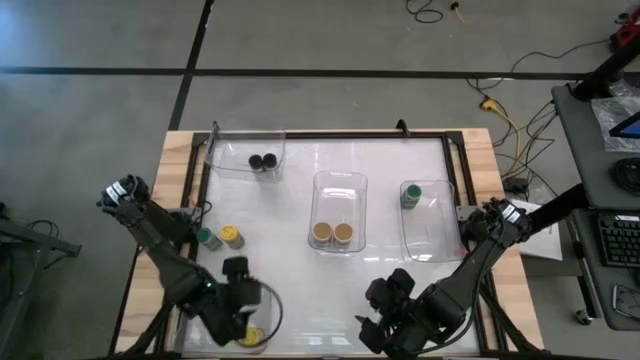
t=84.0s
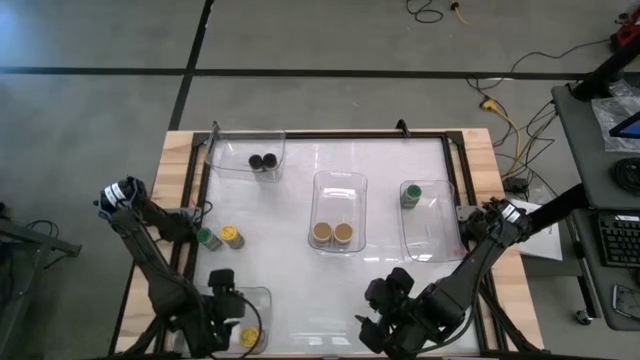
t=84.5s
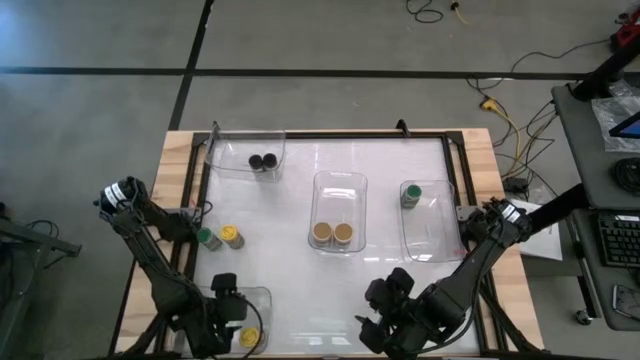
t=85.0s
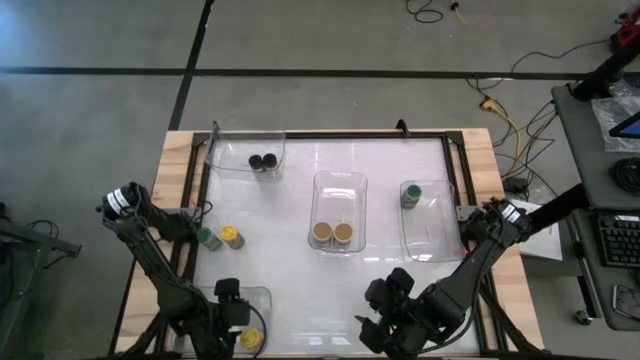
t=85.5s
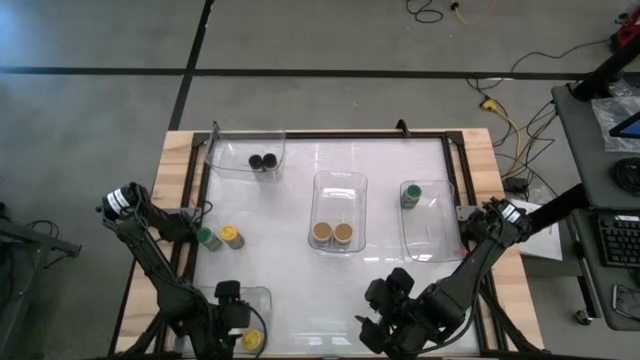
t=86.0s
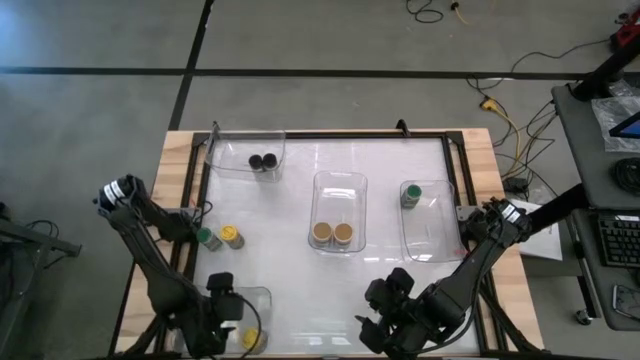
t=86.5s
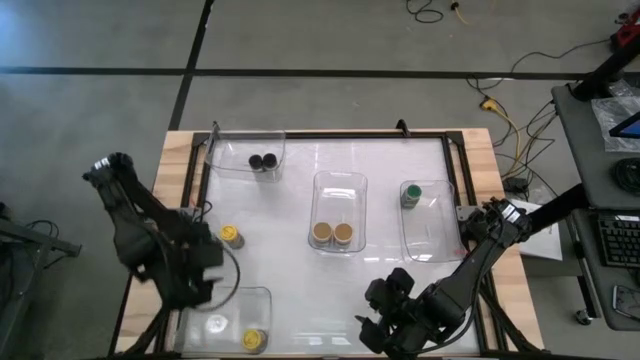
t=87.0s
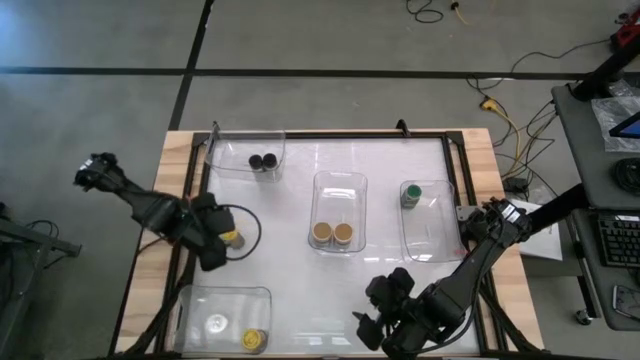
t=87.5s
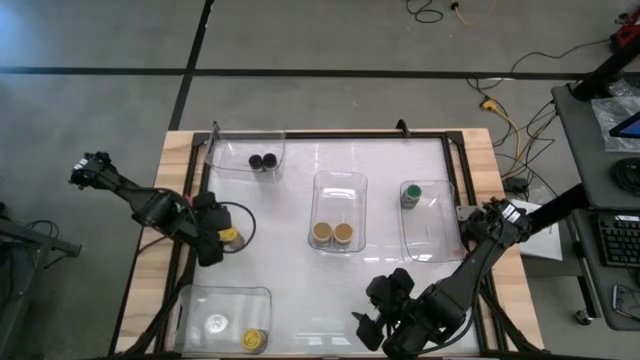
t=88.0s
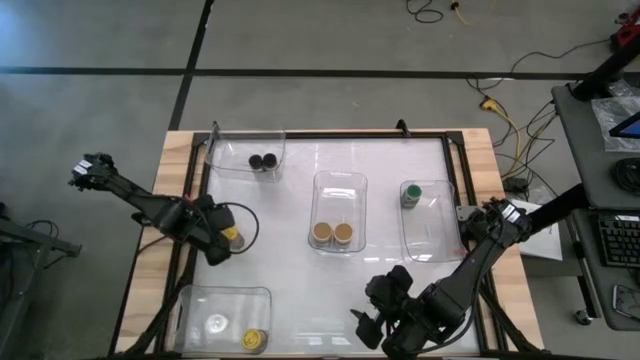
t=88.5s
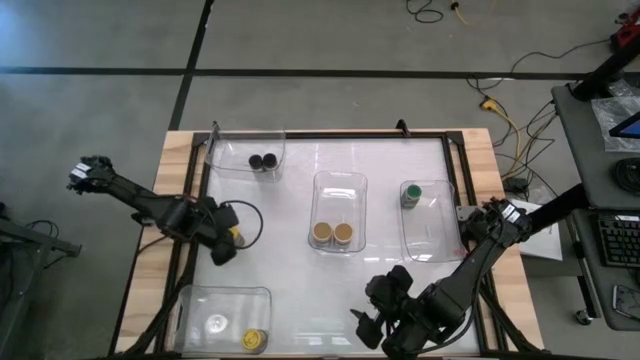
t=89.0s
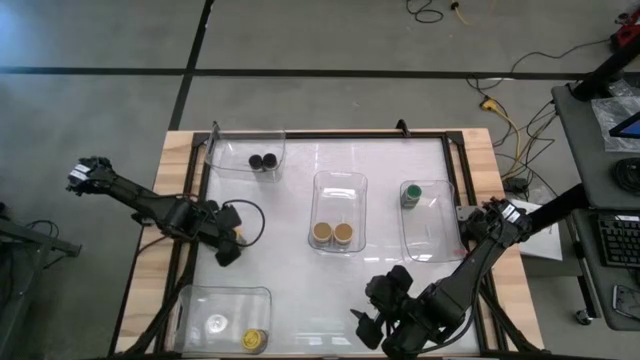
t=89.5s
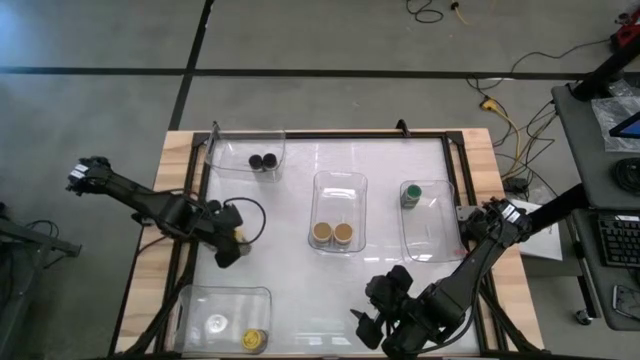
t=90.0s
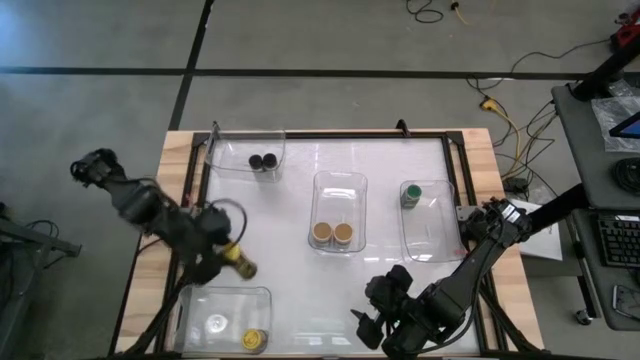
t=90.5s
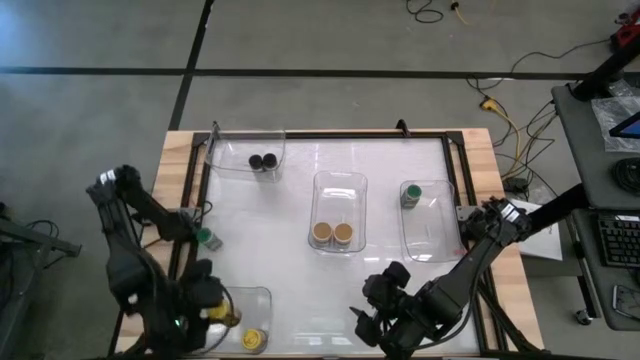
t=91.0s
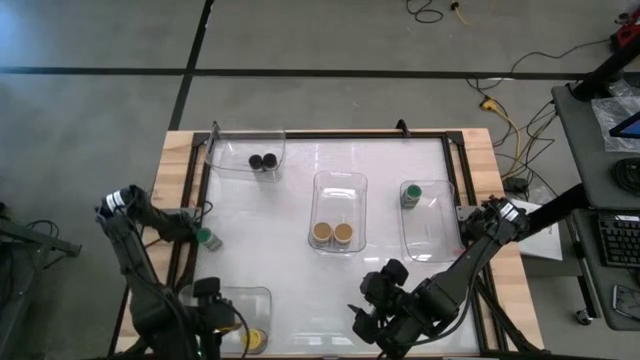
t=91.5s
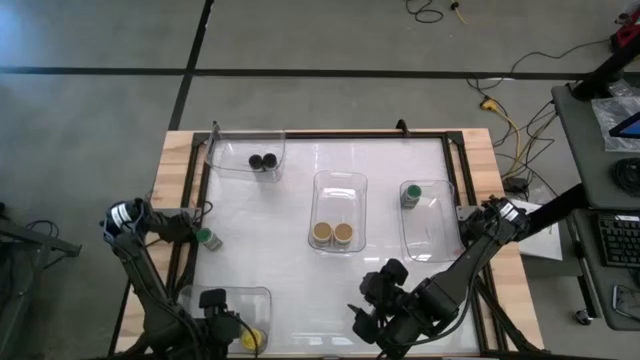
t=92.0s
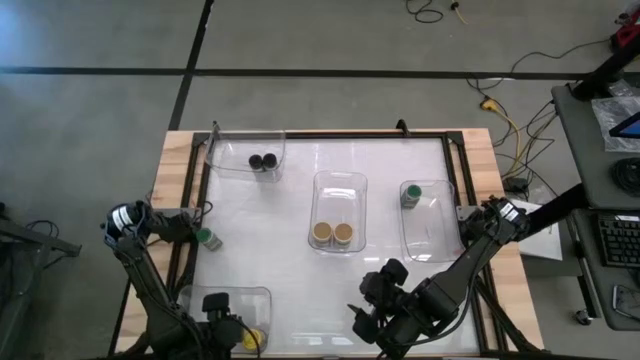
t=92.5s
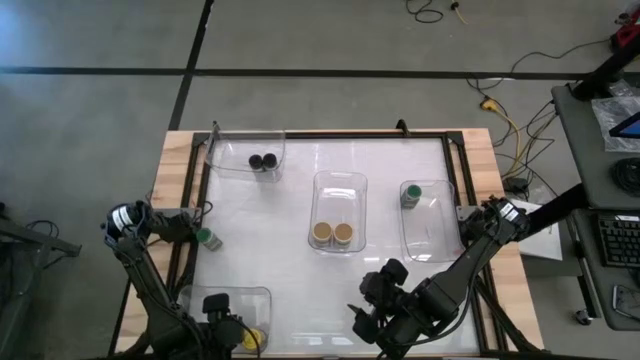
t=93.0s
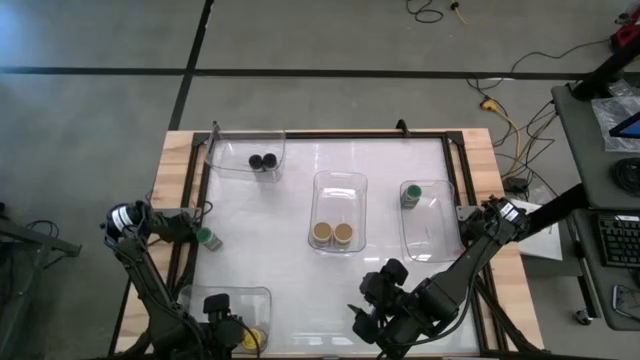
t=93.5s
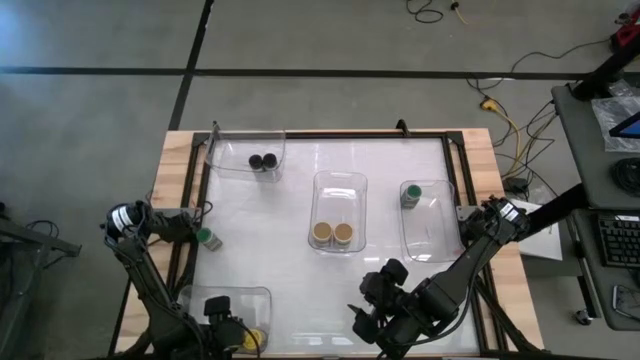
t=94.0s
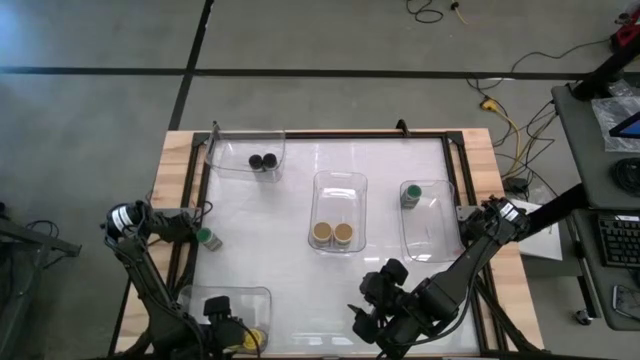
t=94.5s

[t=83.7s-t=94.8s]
Task: Sort spices by type
Put the yellow seasoning bottle into the bottom left transparent bin

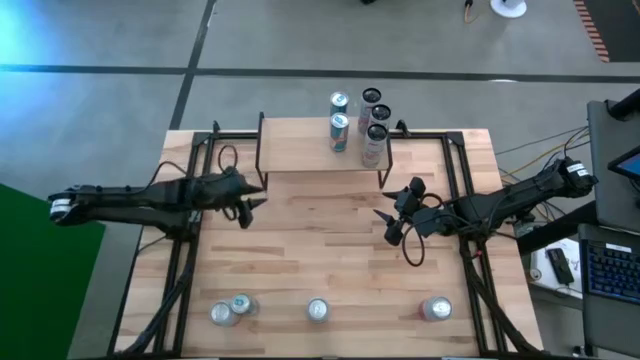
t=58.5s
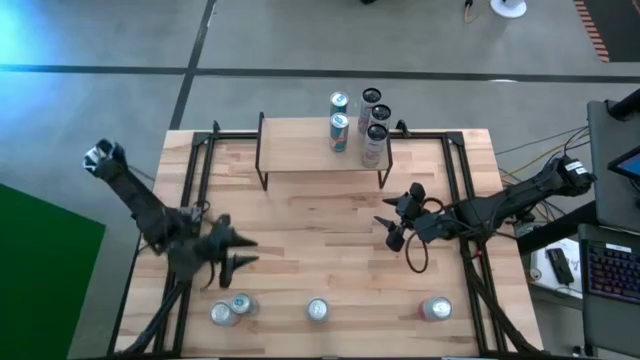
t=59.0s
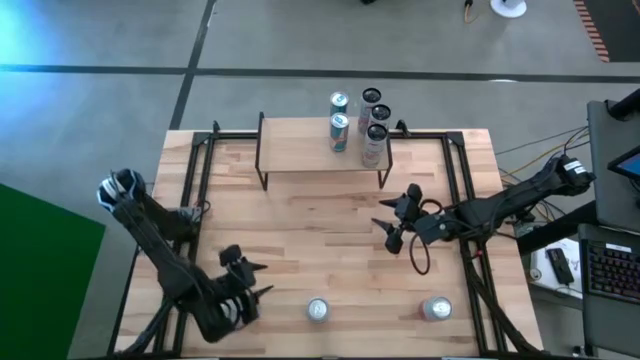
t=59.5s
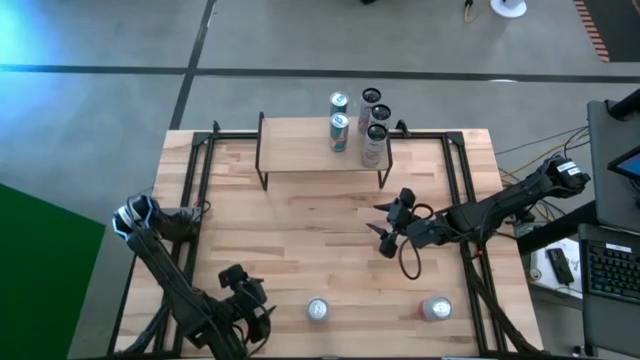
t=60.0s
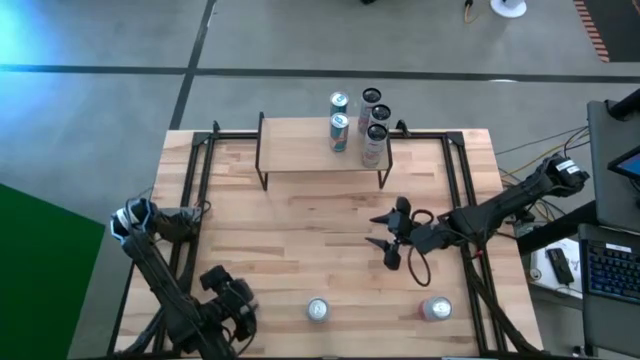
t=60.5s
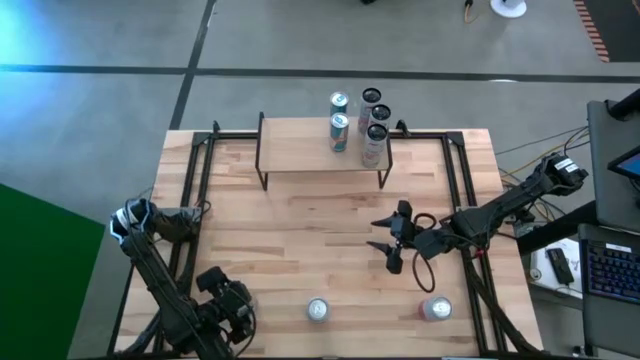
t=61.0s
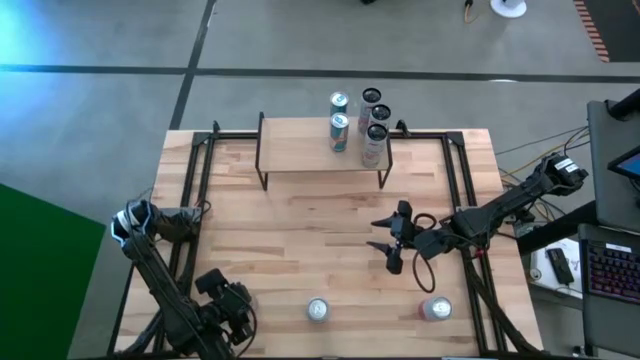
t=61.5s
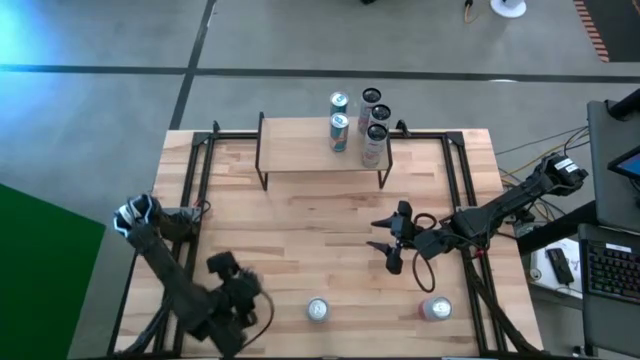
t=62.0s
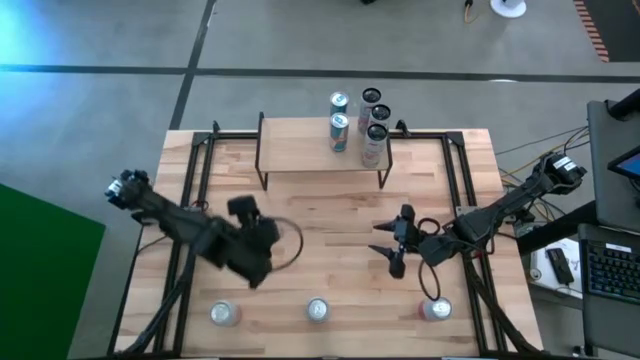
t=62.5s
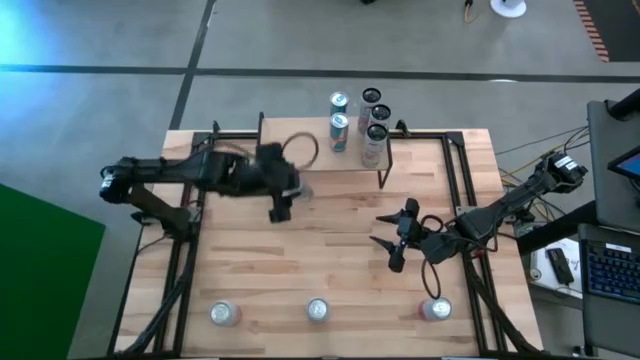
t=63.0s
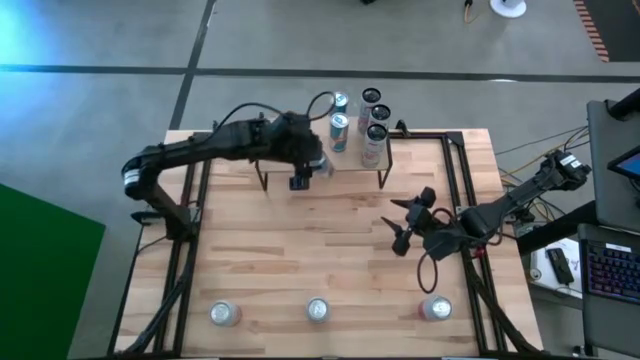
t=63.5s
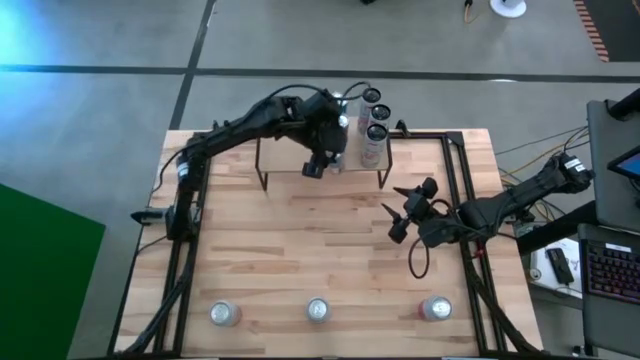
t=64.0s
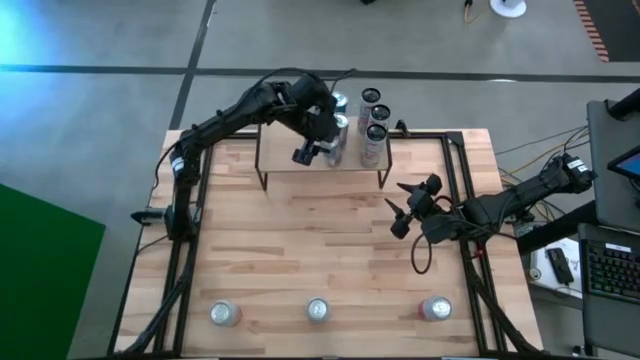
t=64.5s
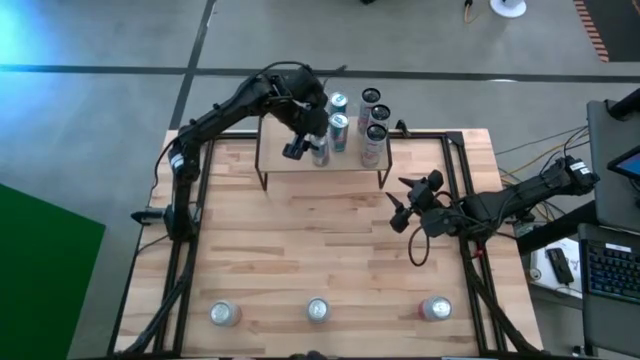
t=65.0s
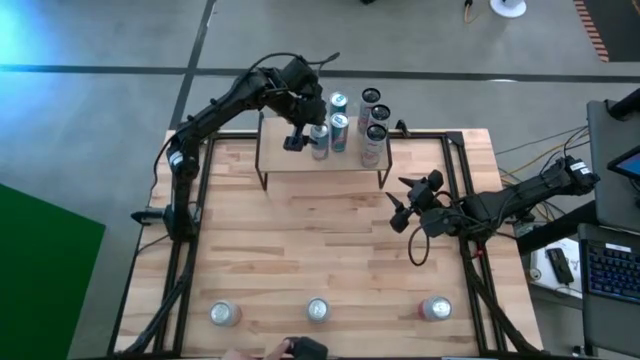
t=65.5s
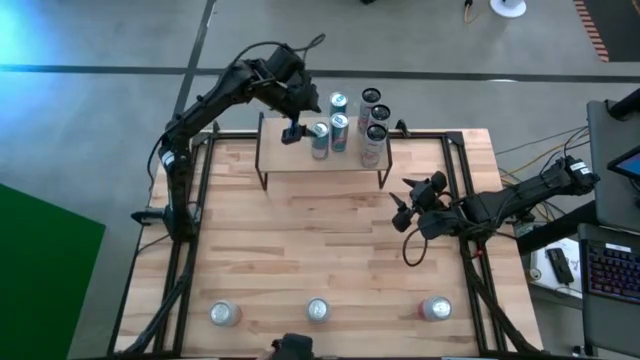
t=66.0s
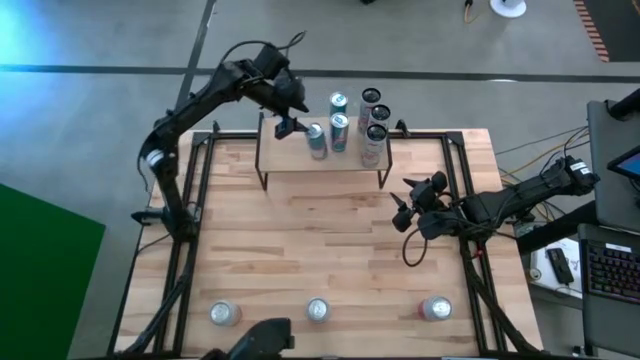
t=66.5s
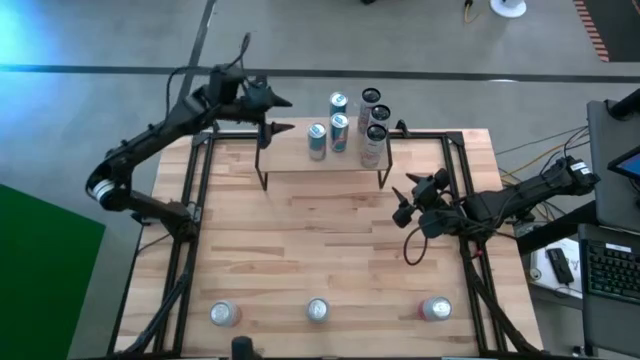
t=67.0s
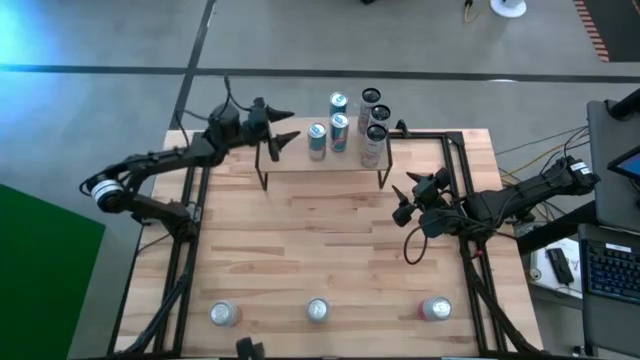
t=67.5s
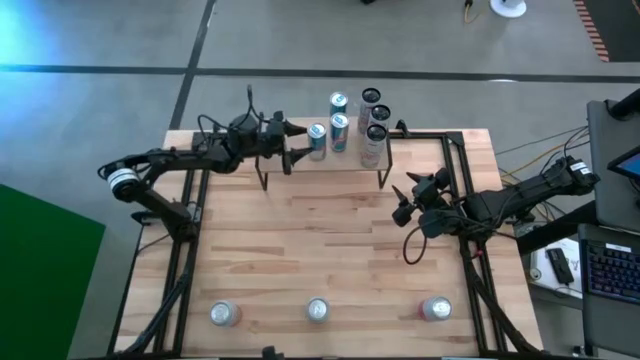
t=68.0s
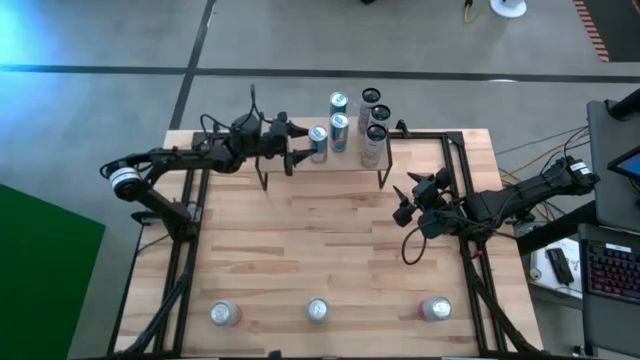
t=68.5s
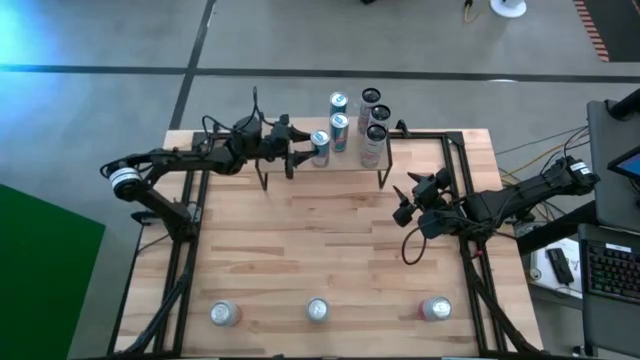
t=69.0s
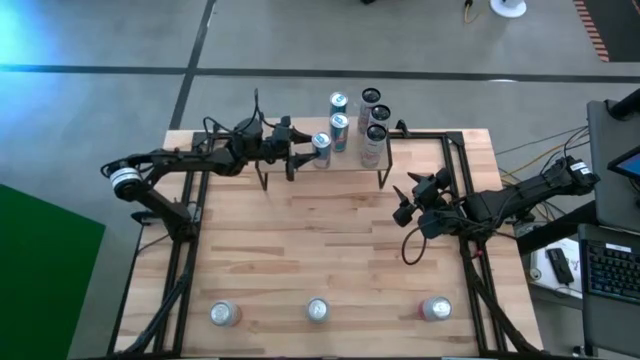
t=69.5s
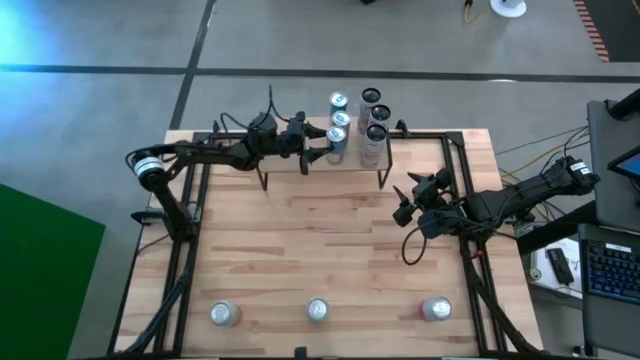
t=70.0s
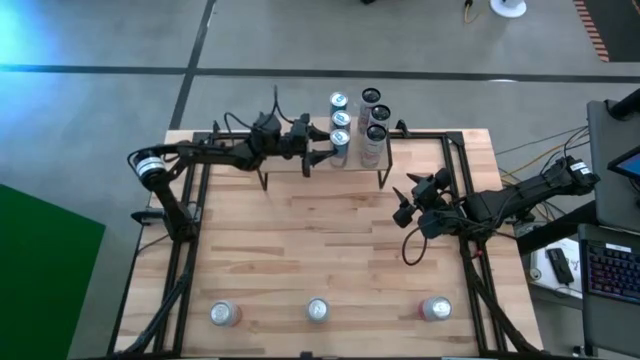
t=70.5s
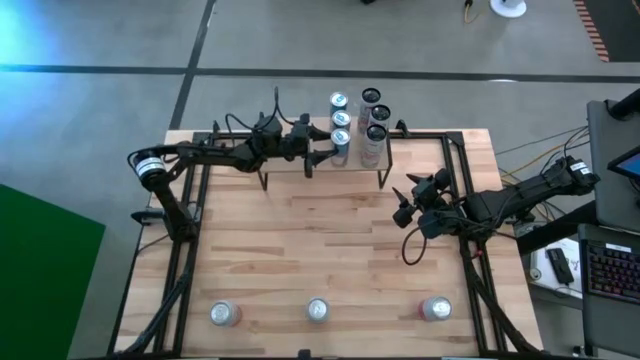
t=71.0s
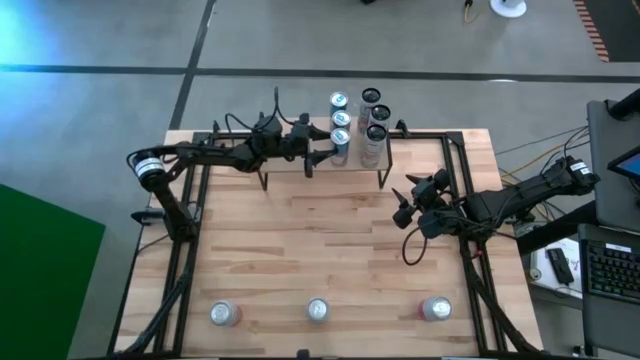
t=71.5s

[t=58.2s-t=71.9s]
Task: Place canned beverage on shelf
Put the blue soda can on the shelf aligned with the other blue soda can
